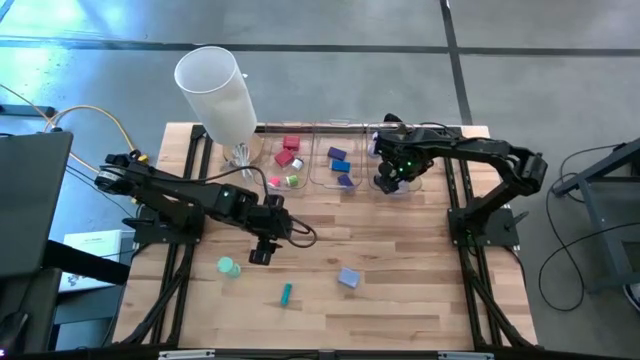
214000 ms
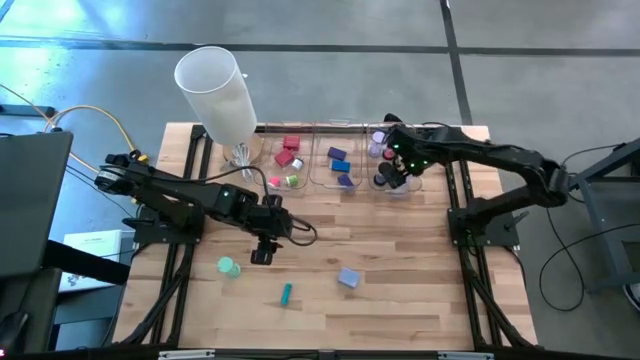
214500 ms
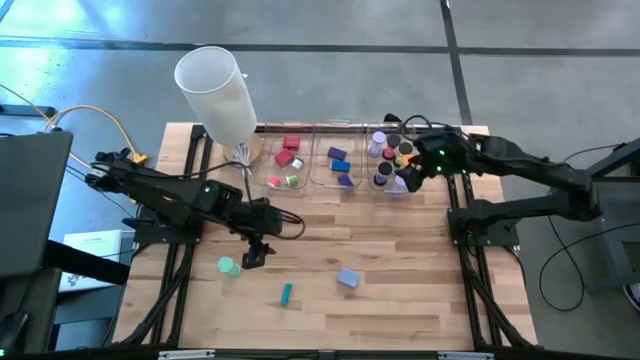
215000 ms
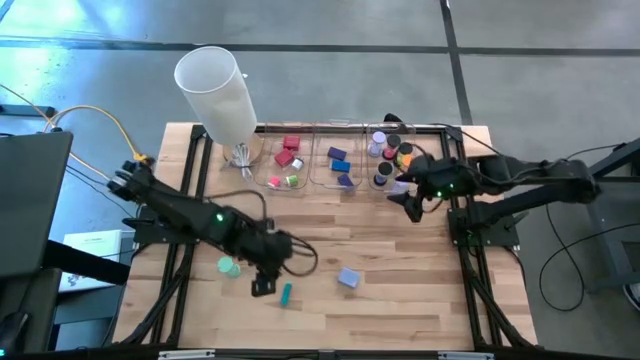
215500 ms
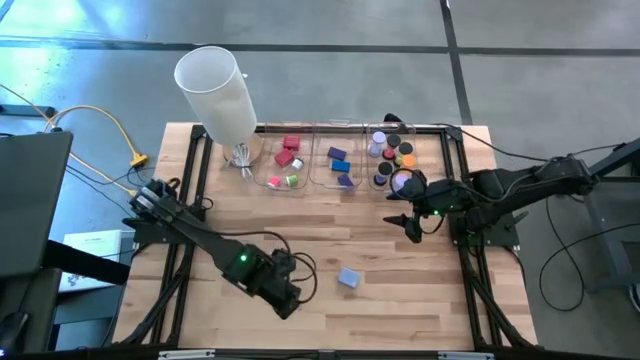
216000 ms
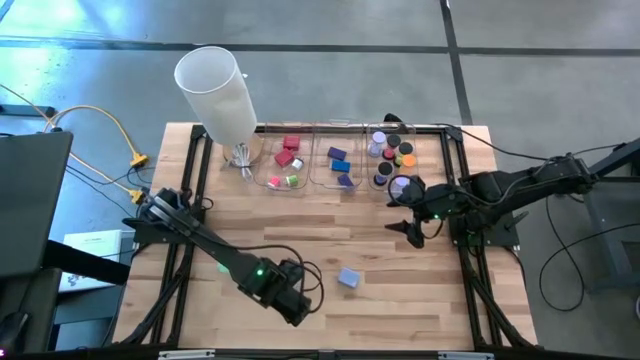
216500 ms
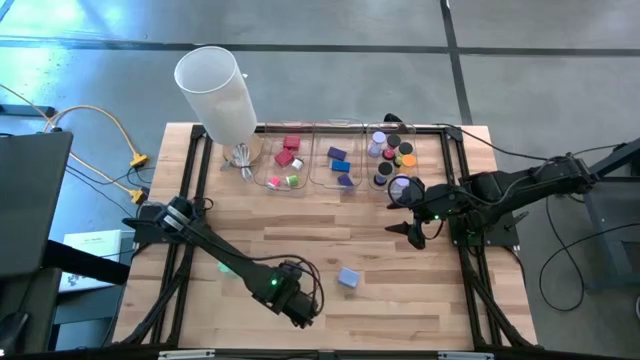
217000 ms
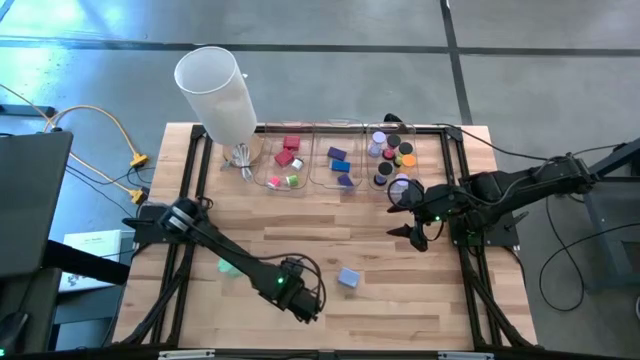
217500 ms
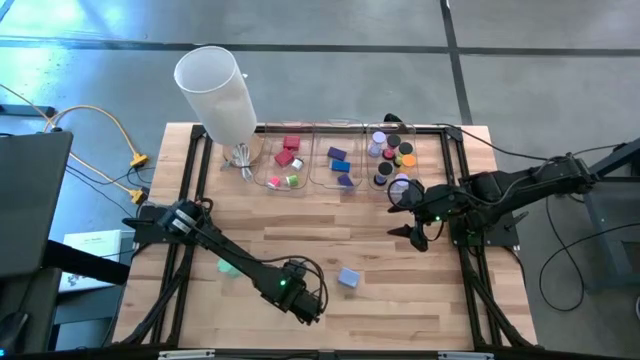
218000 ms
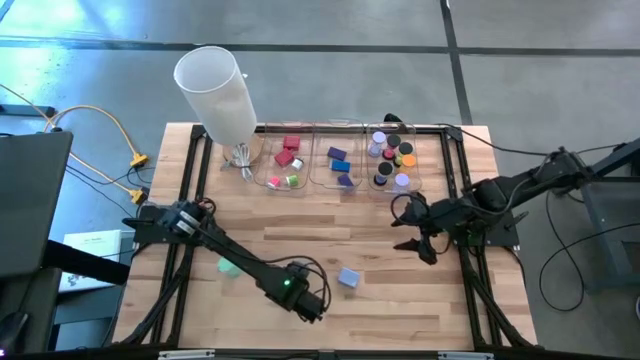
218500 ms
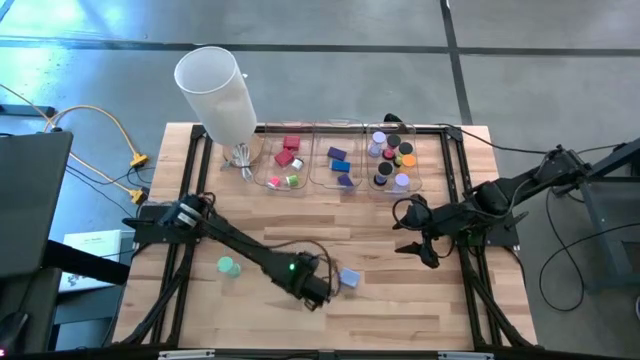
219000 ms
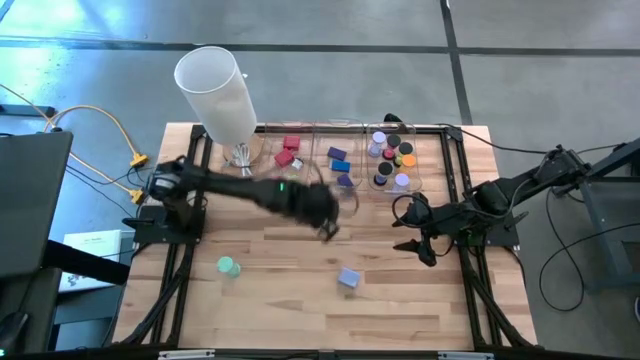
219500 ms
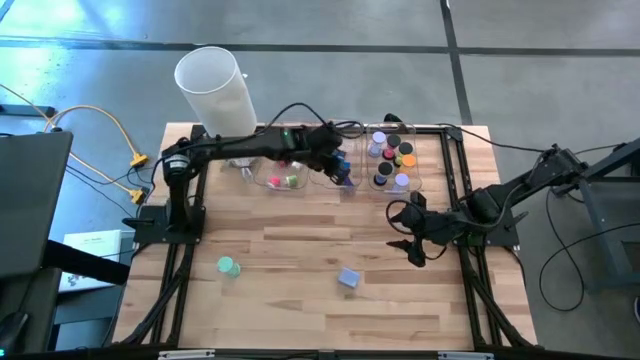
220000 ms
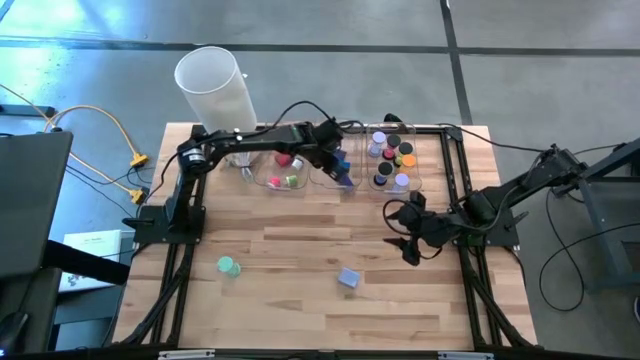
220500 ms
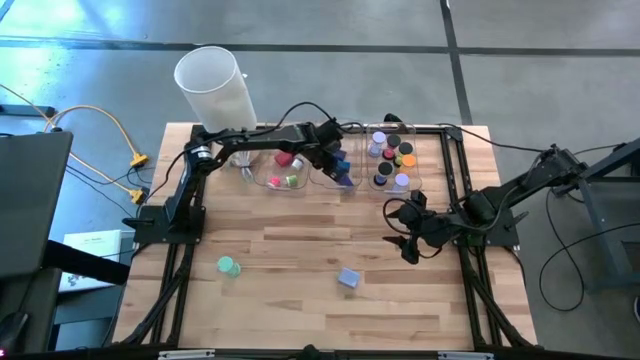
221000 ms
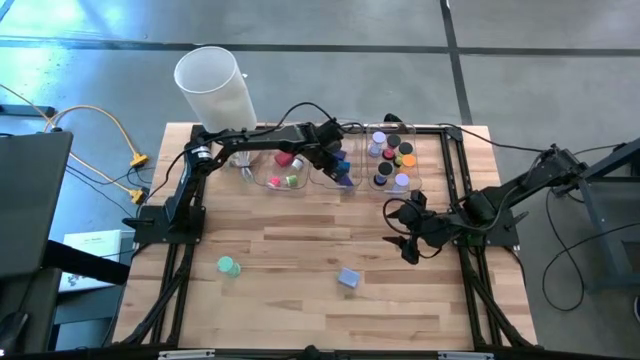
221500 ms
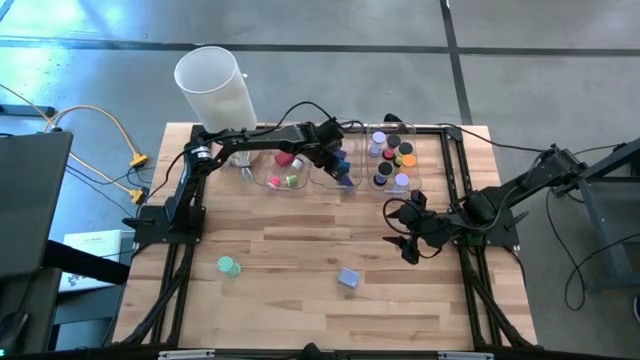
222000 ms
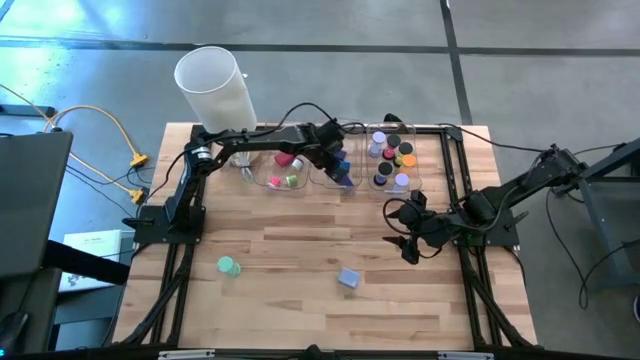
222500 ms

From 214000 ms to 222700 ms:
Task: Pick & Place Office items
Put the light blue digital clock into the middle transparent bin

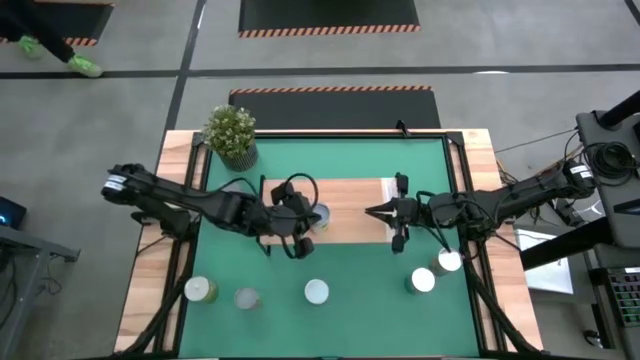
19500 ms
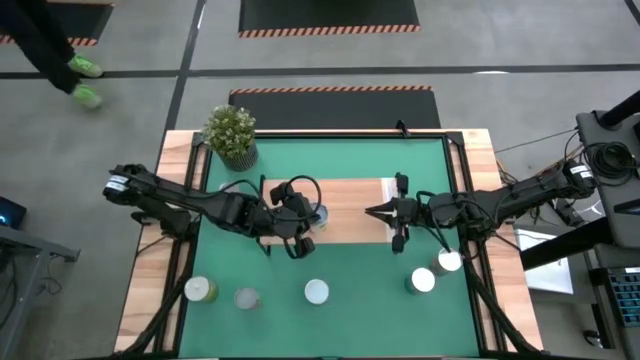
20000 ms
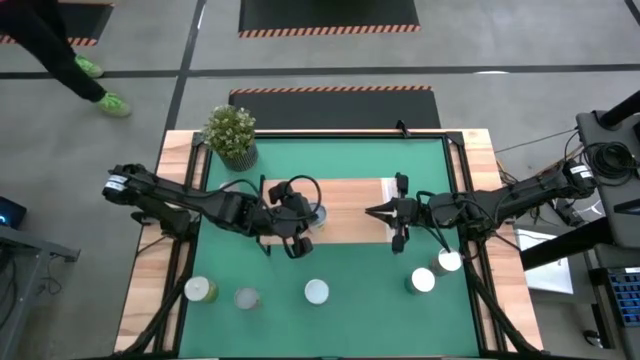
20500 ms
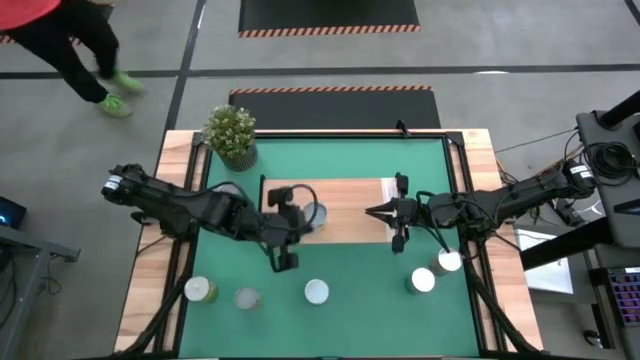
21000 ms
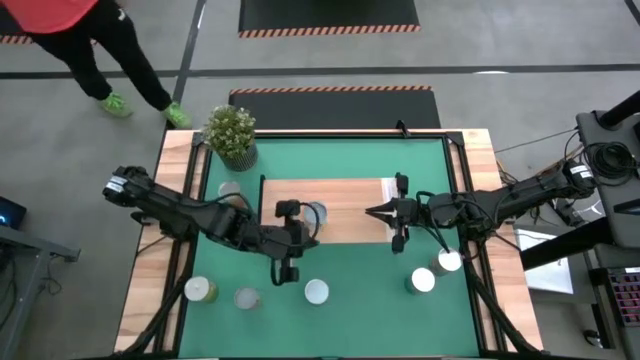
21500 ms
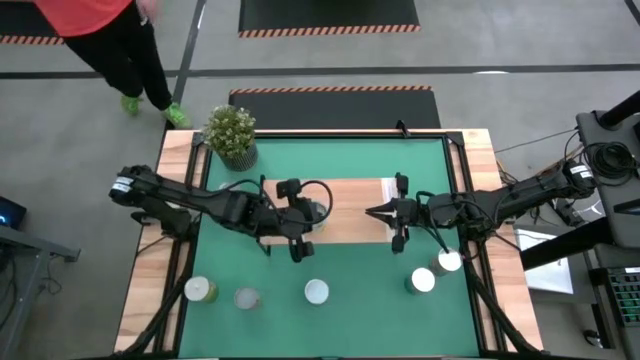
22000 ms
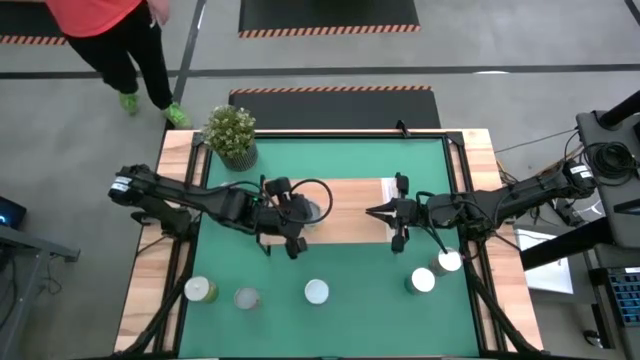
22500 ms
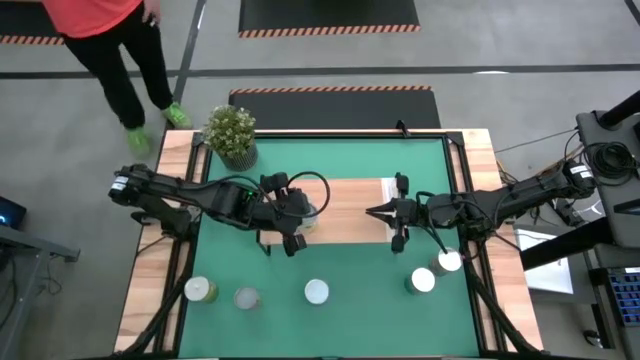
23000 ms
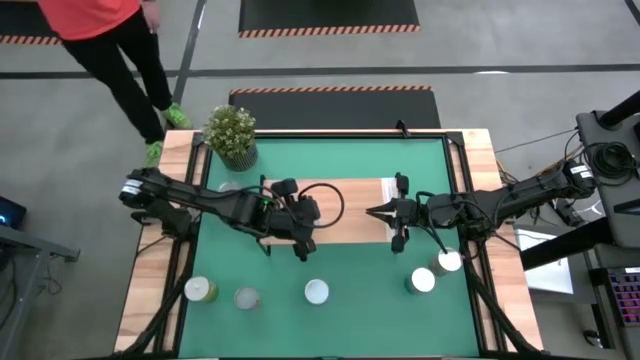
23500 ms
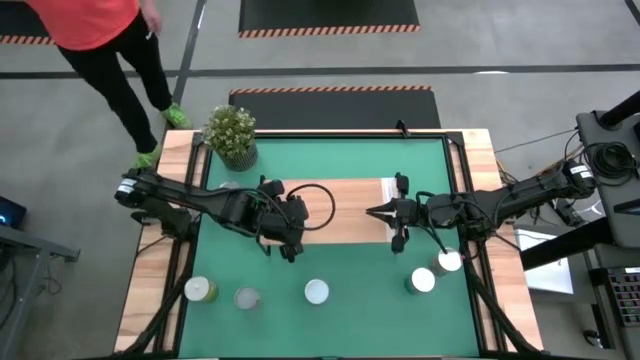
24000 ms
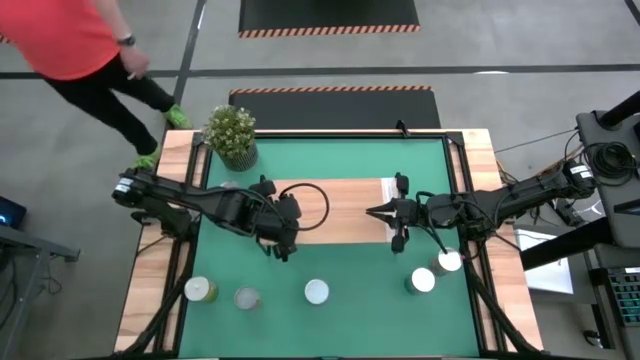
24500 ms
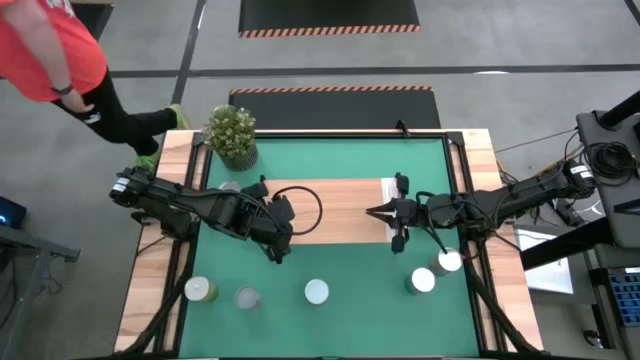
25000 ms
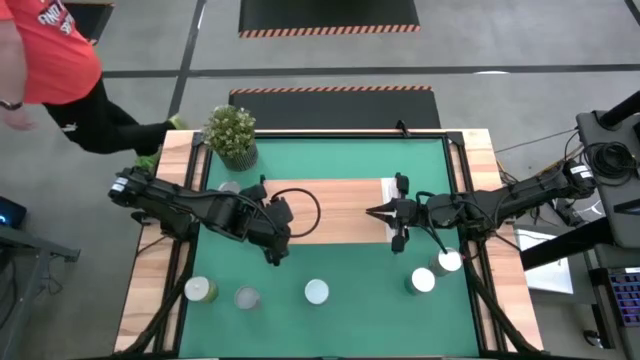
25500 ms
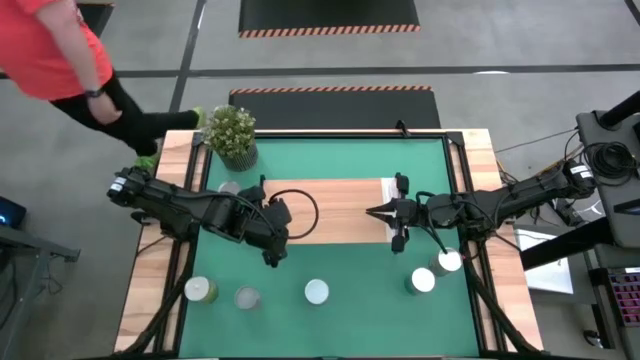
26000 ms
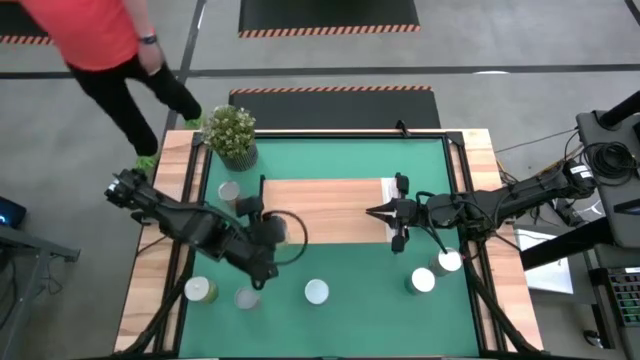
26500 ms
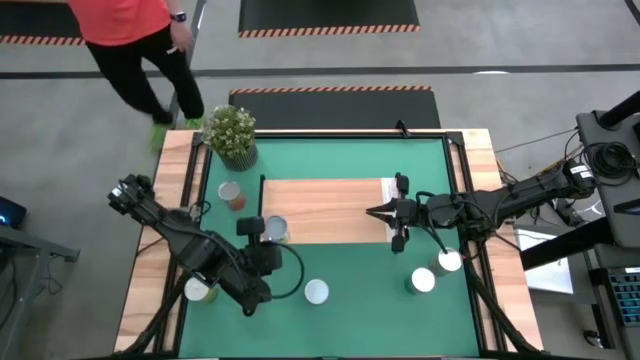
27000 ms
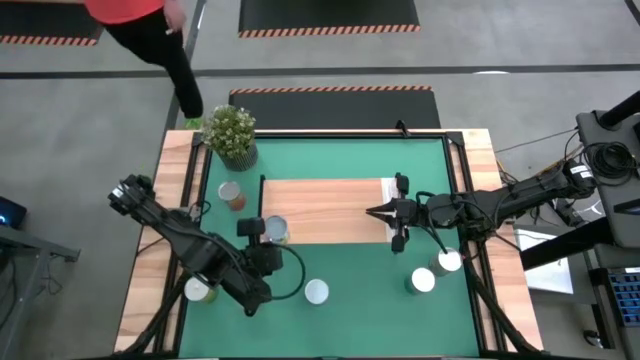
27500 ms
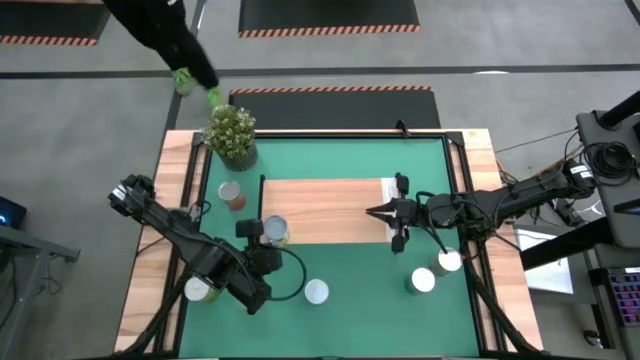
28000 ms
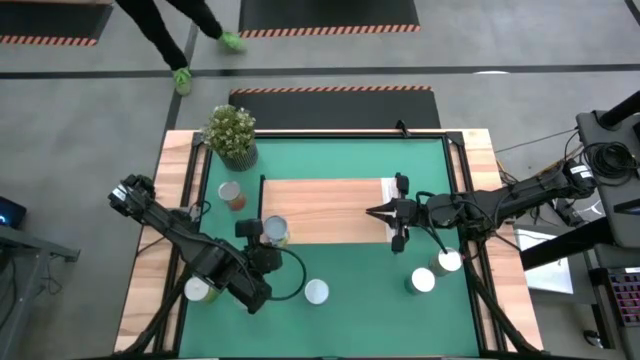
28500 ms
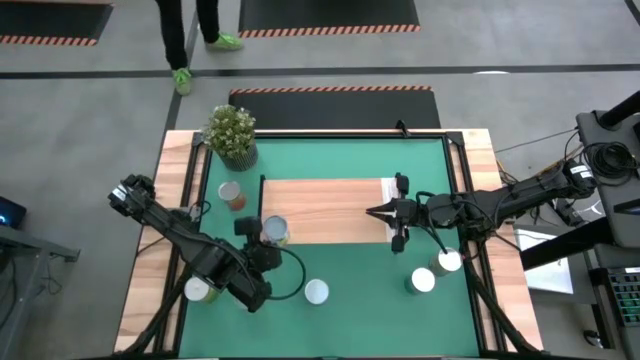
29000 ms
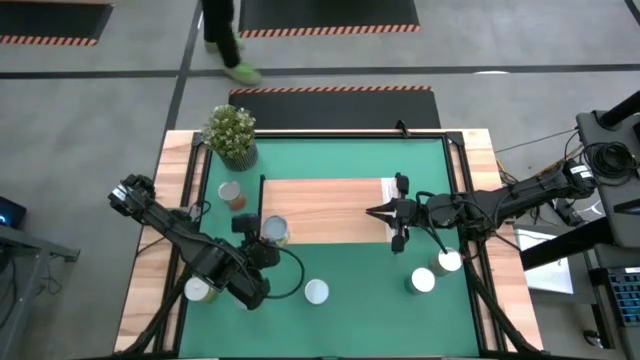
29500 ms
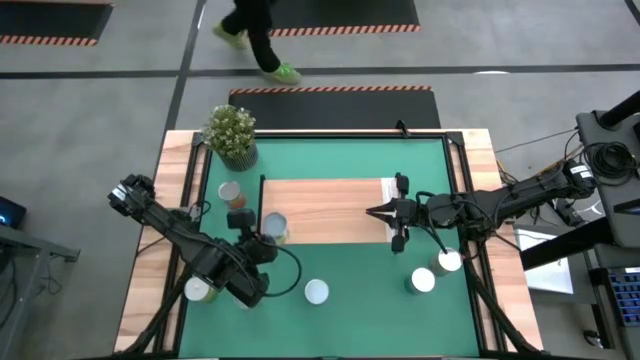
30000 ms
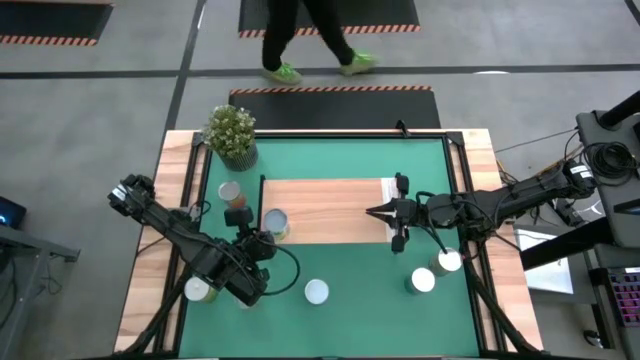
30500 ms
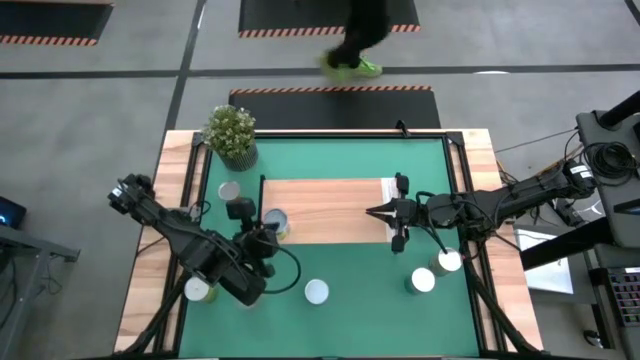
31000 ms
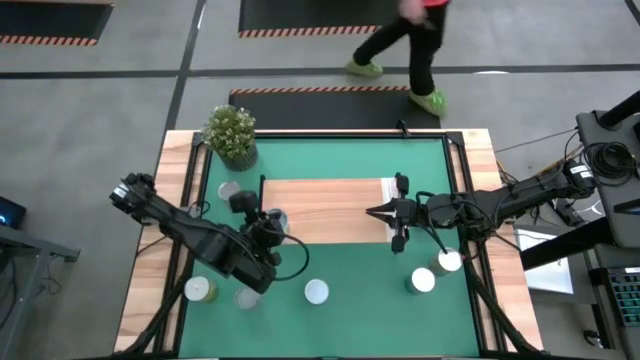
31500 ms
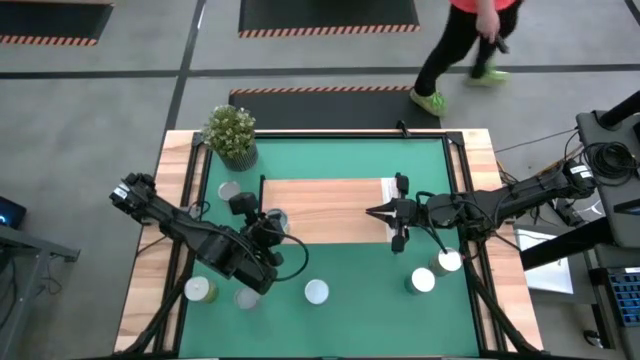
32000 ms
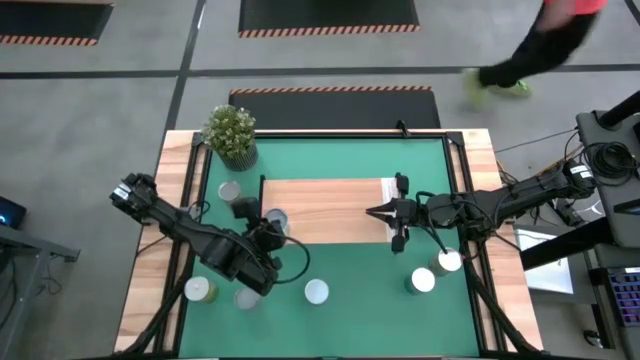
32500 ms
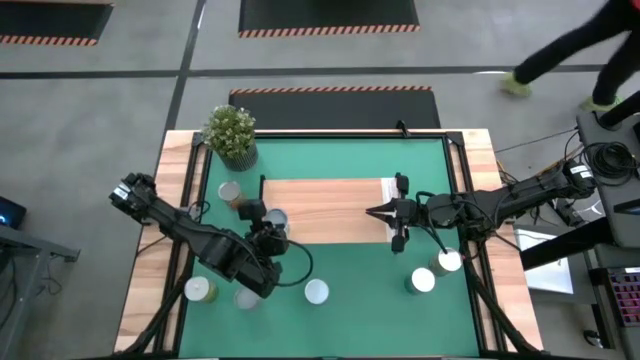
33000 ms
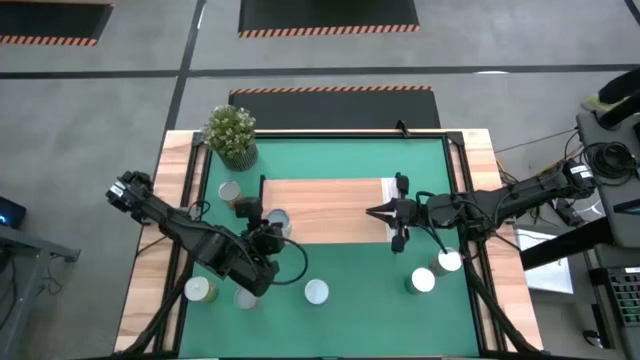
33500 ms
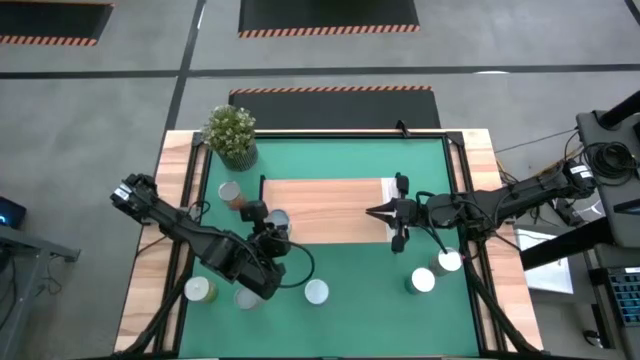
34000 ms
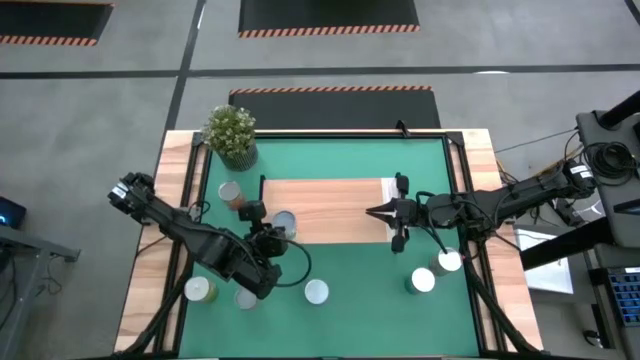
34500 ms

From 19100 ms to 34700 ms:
Task: Pick and place cans onto a shelf
Put the canned of mixed fruits on the shelf
